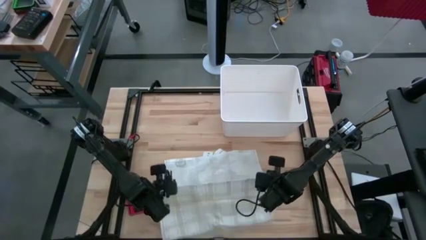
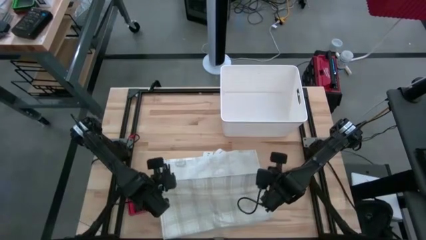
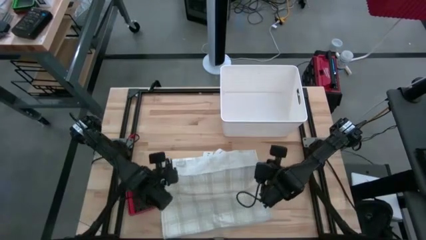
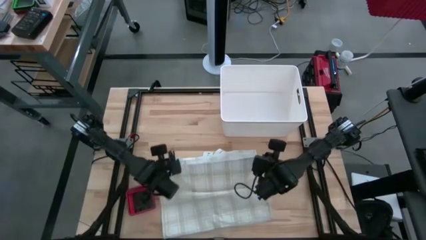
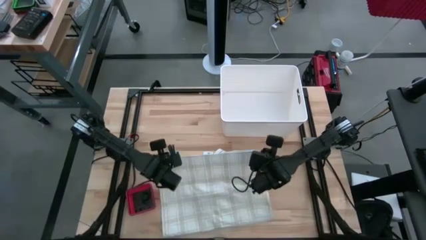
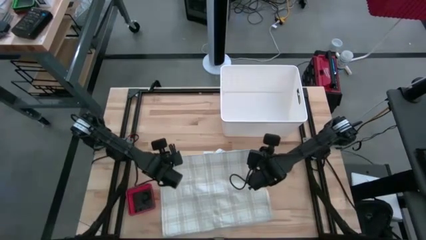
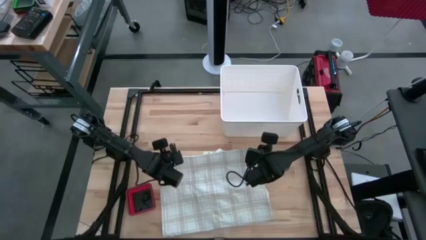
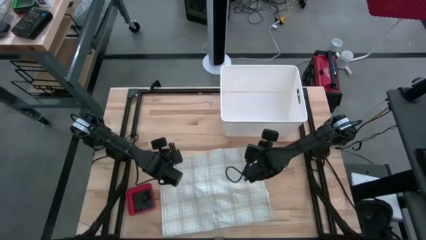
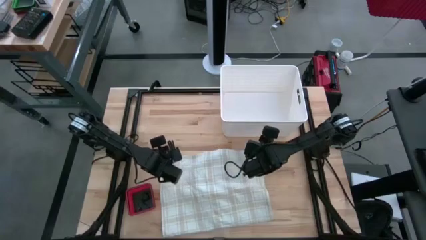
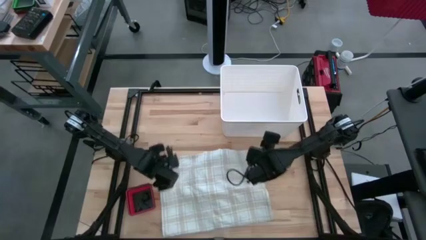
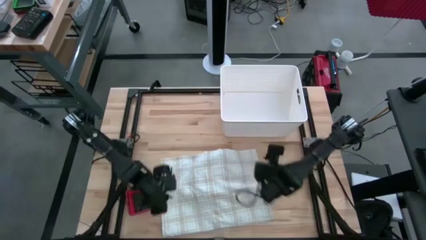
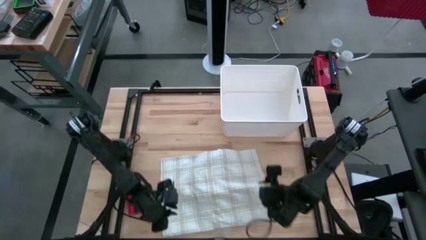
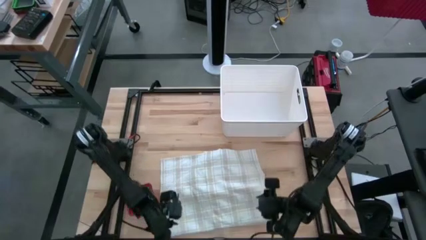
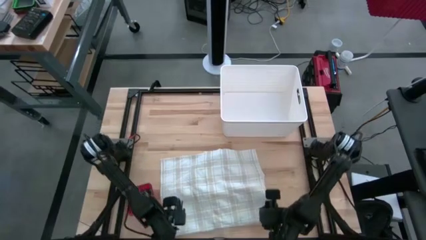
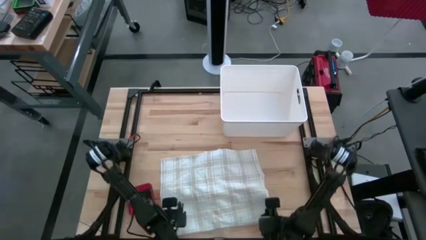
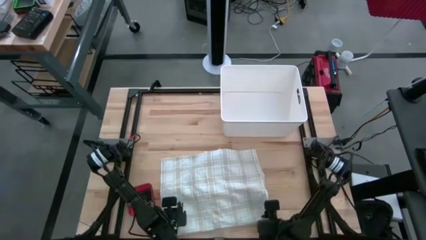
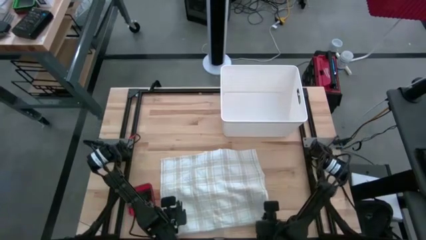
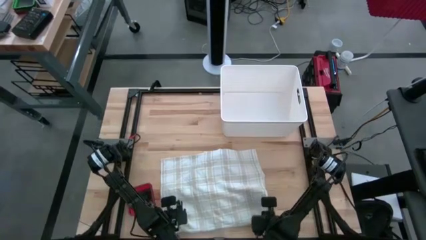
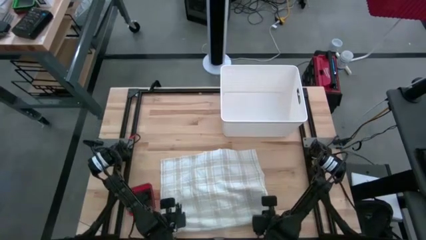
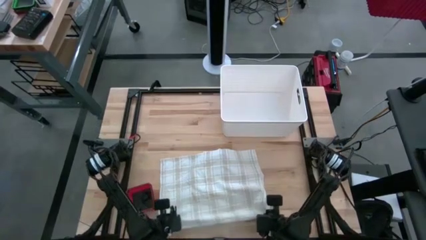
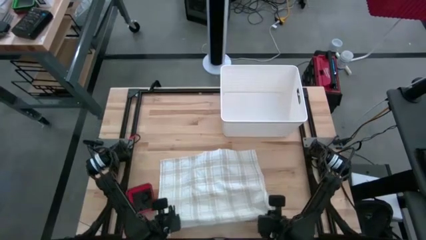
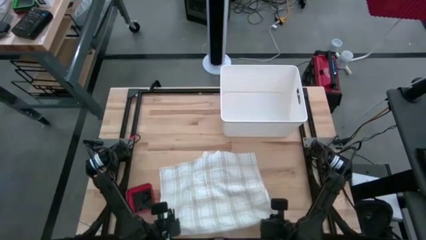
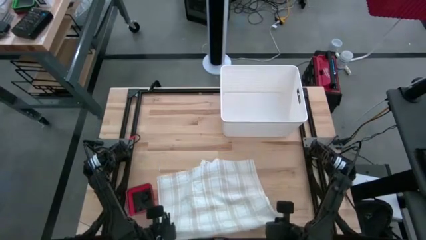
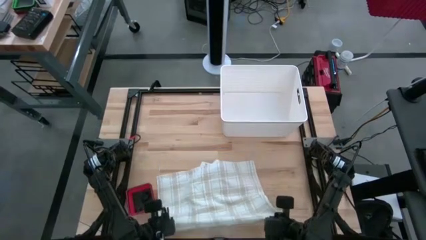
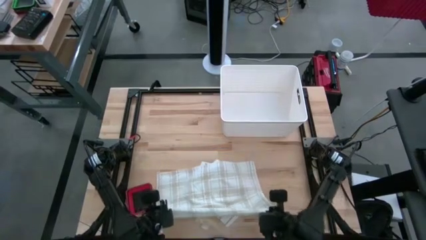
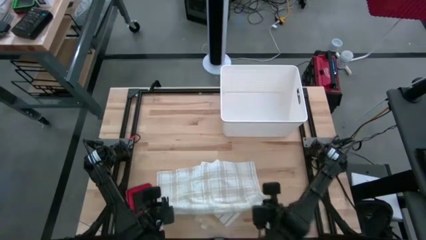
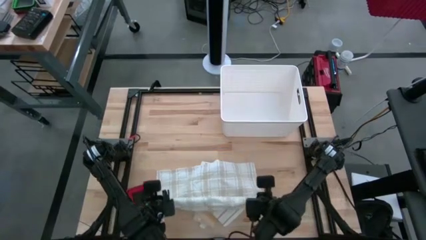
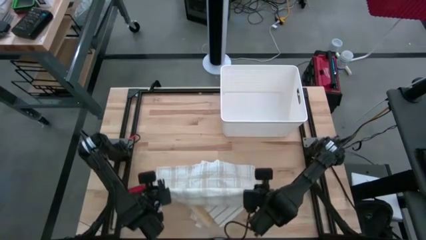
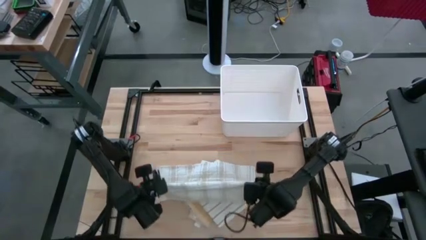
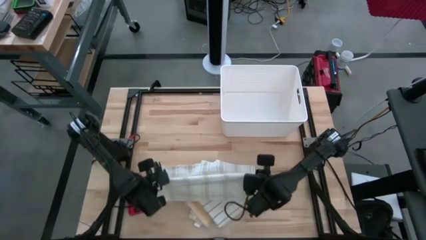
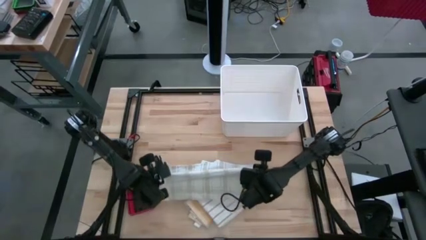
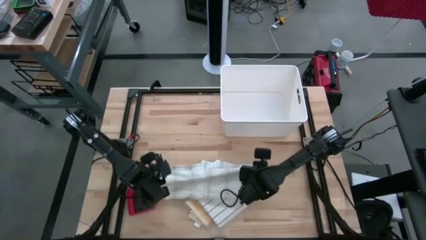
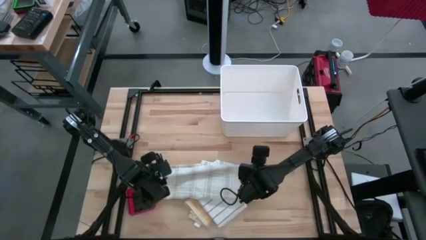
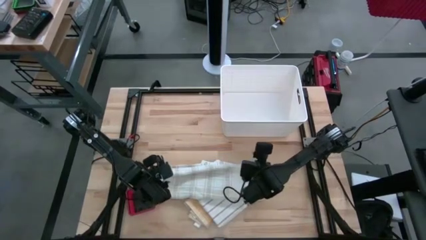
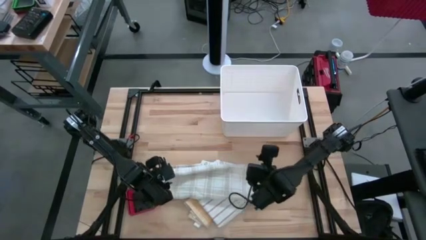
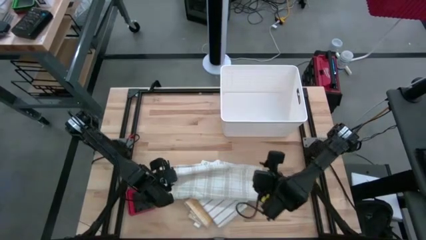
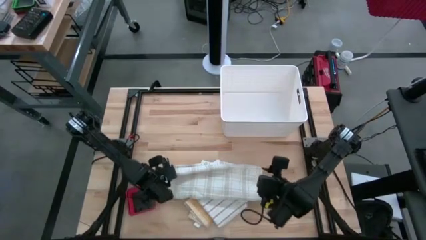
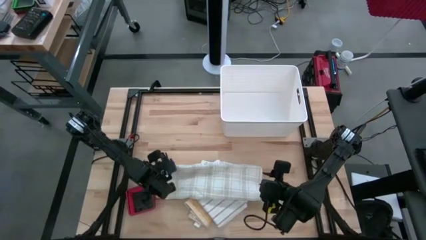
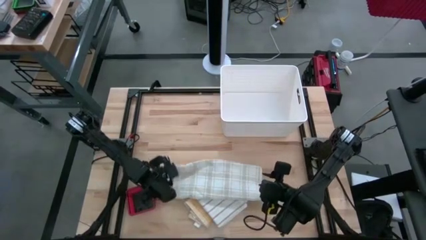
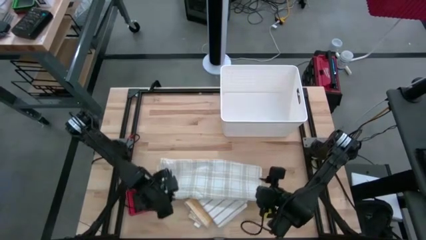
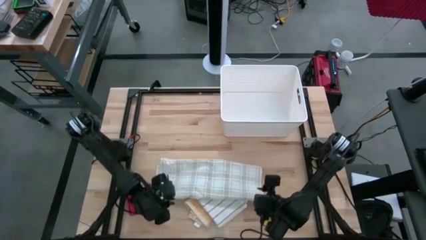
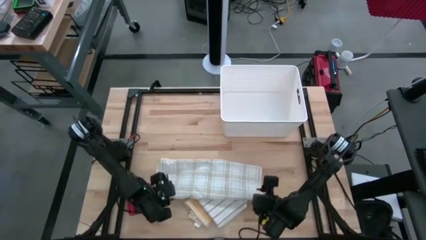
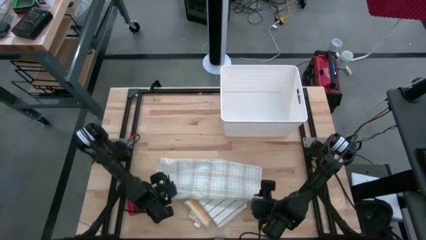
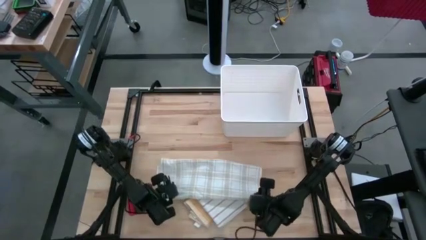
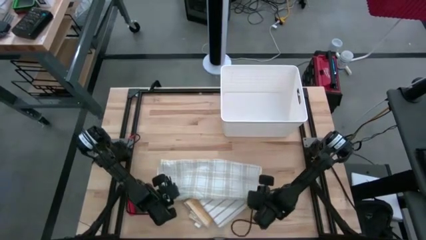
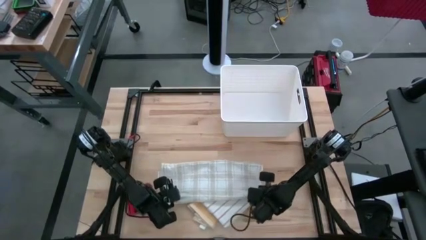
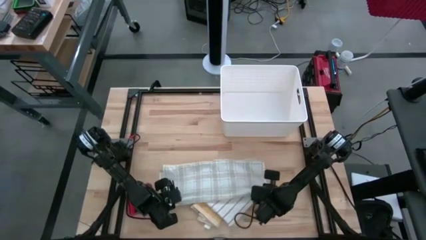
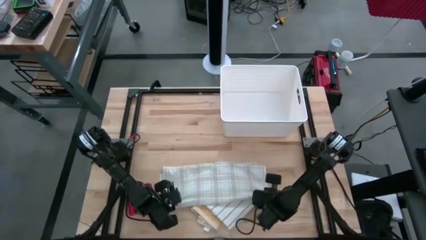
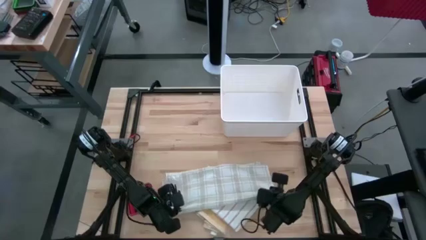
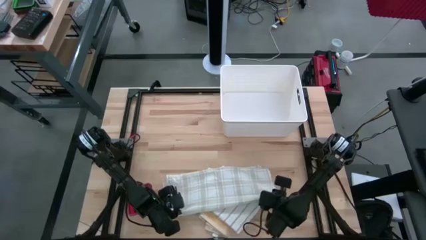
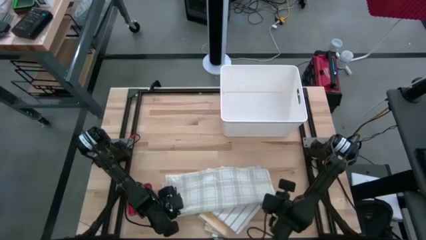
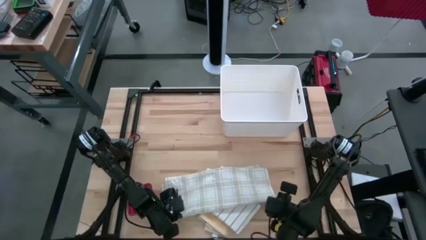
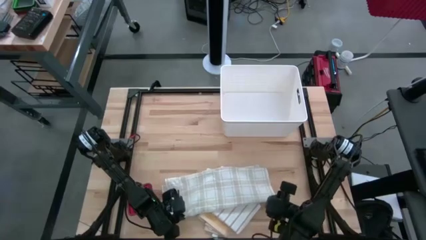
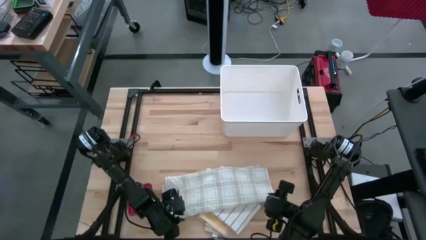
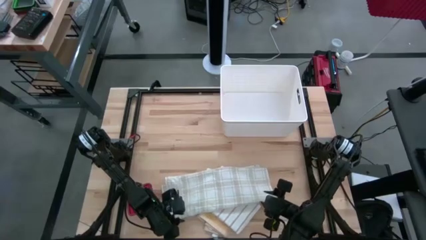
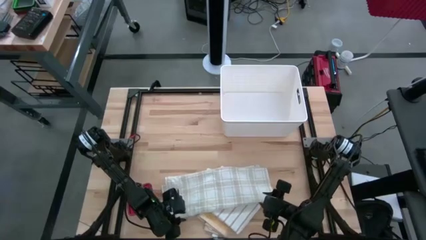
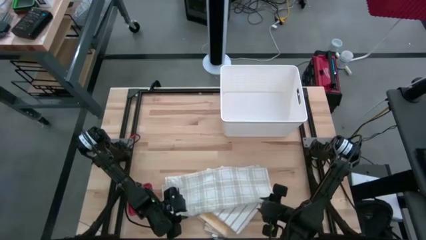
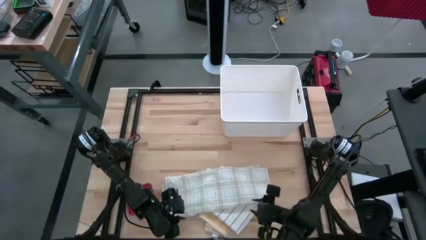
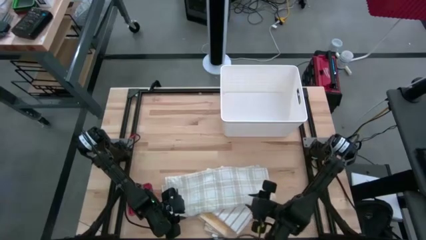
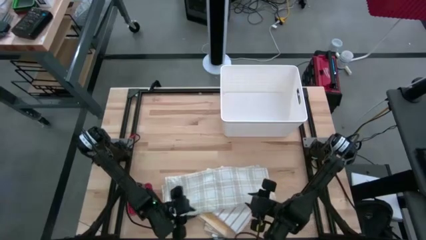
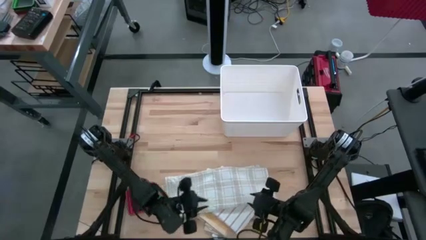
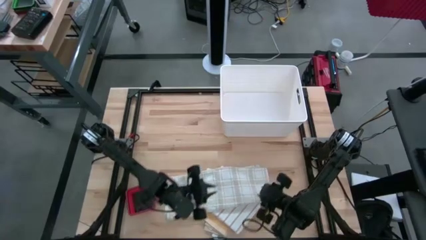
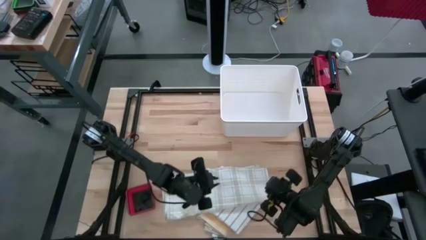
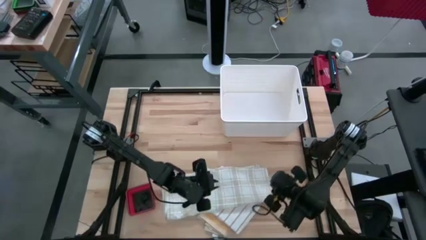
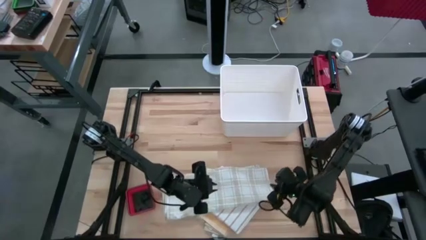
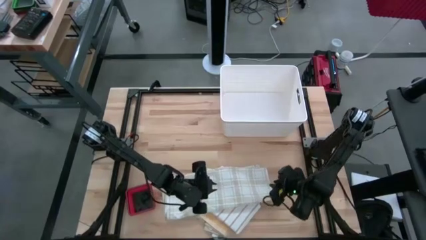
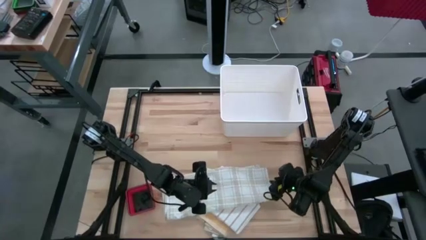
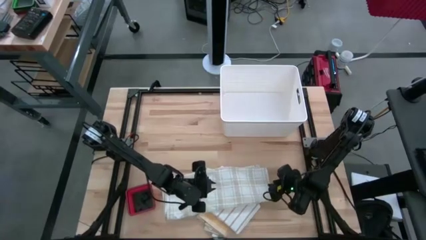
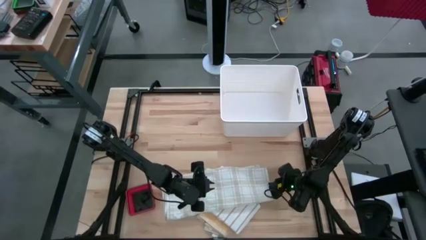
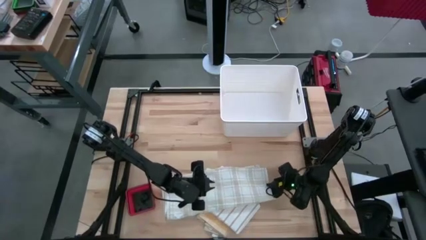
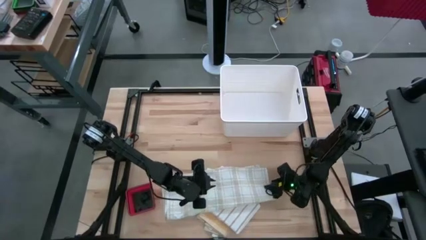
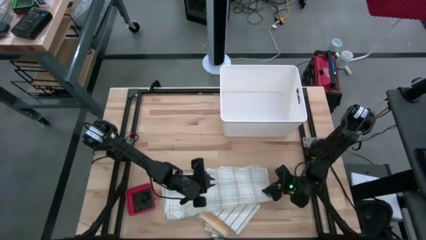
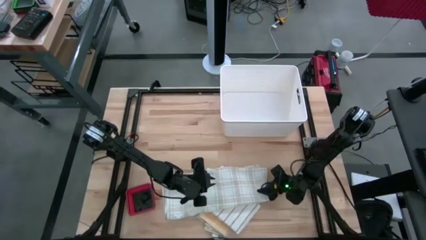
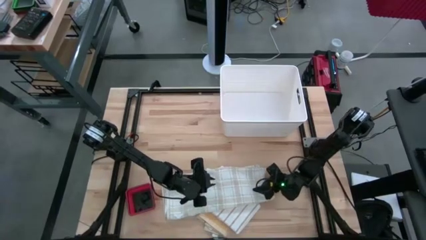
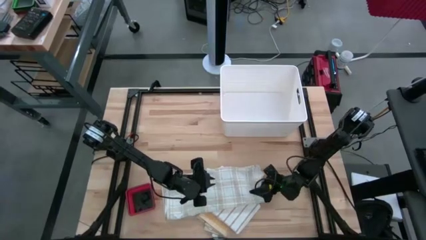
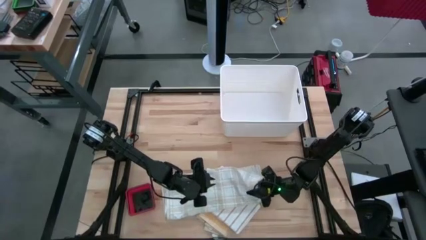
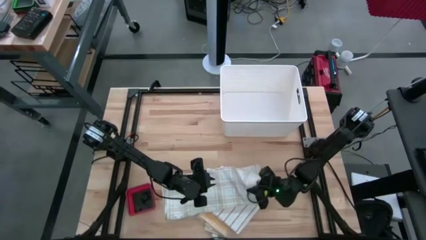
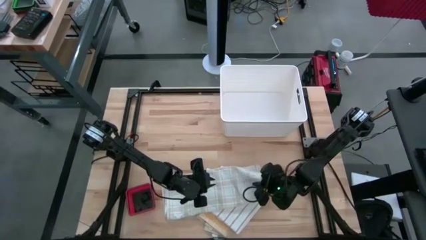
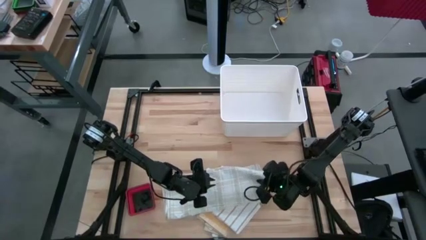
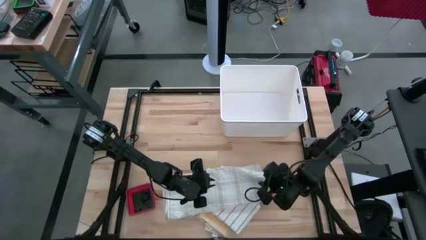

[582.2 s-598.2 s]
Task: Fold towel
Fold the light brown kitchen towel
